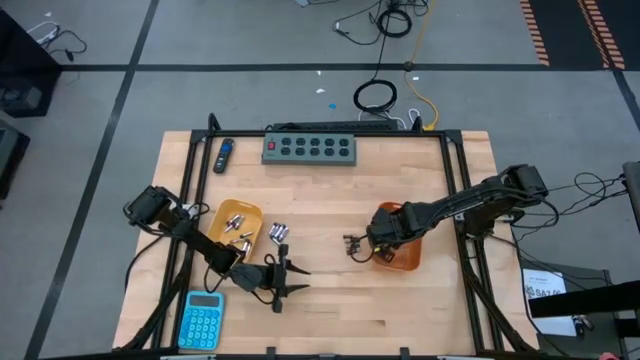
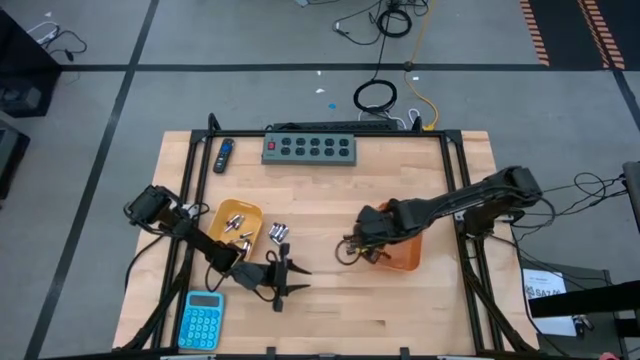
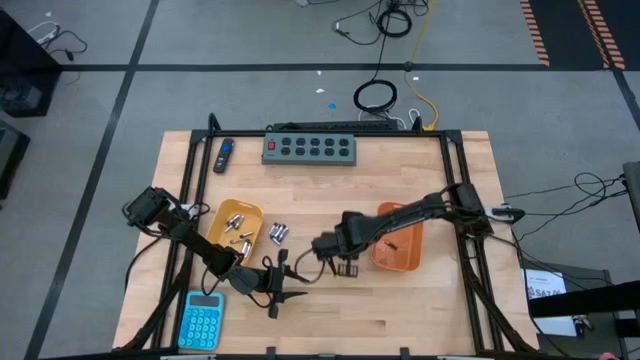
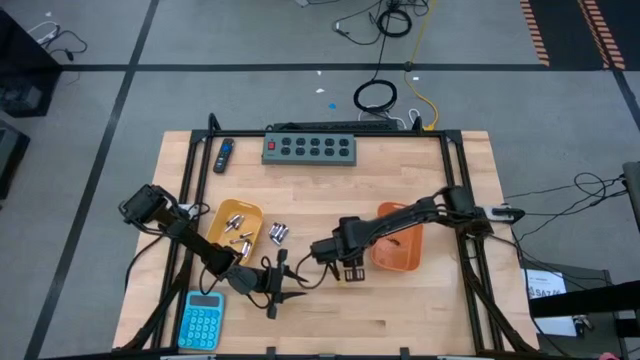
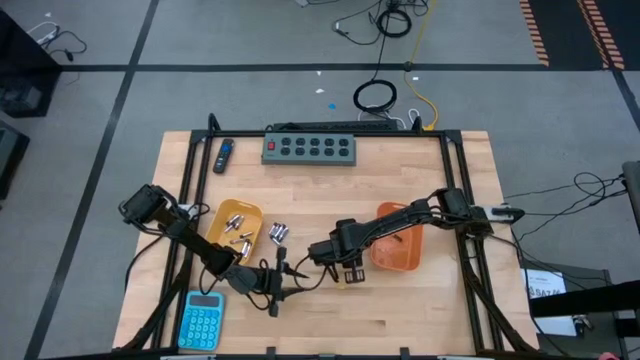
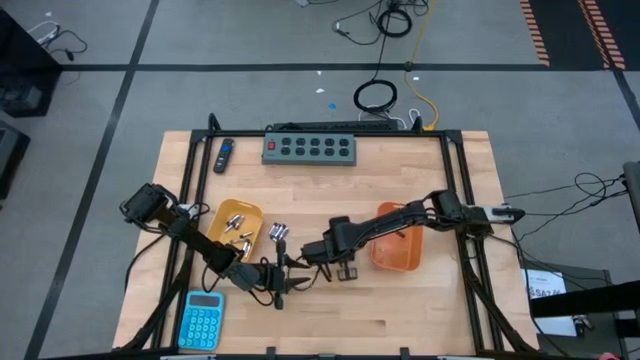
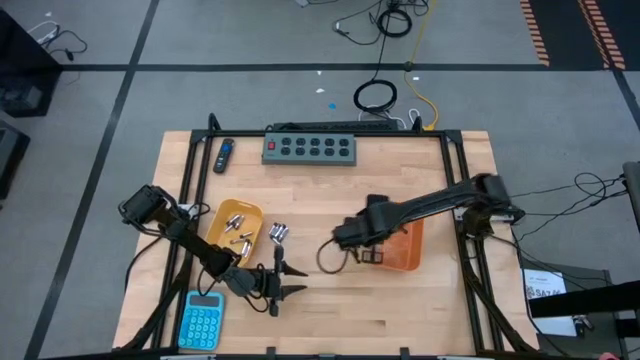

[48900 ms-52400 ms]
Task: Sort batteries
Put the black battery into the orange bin

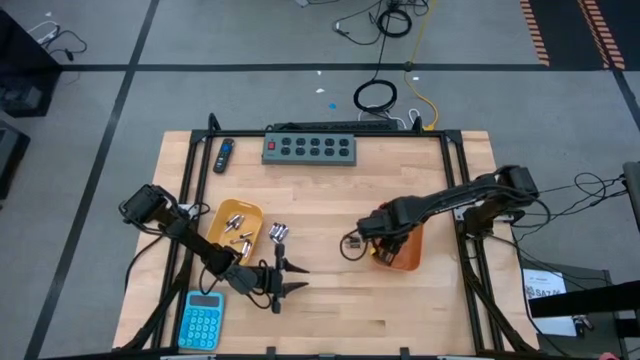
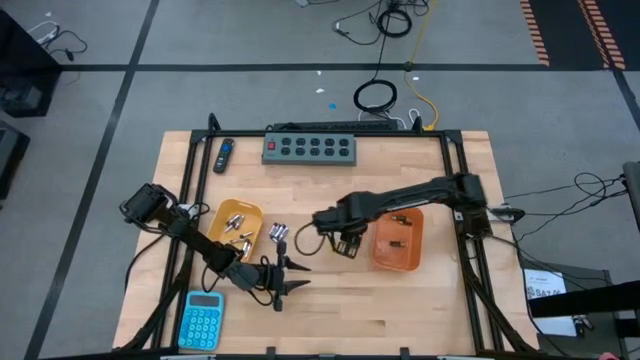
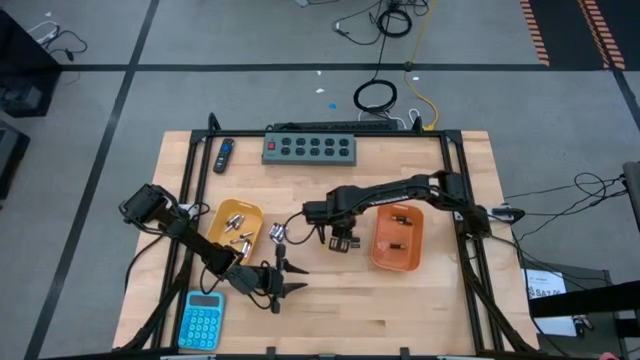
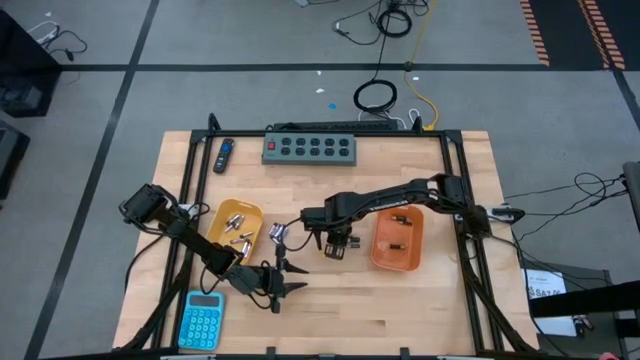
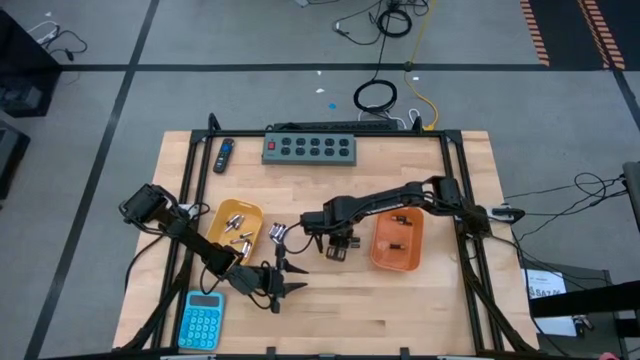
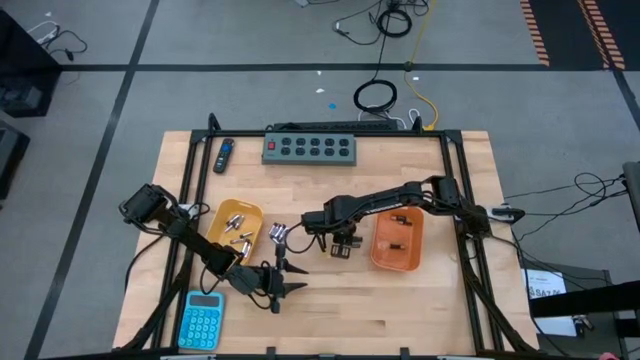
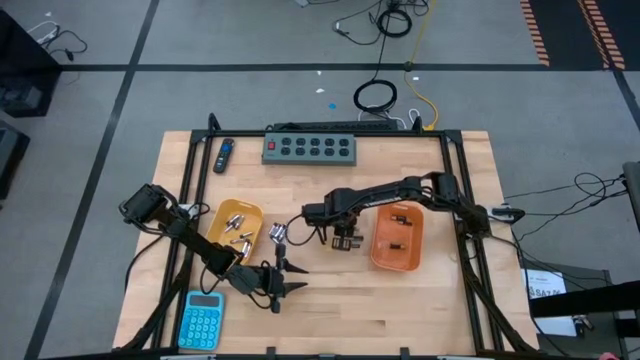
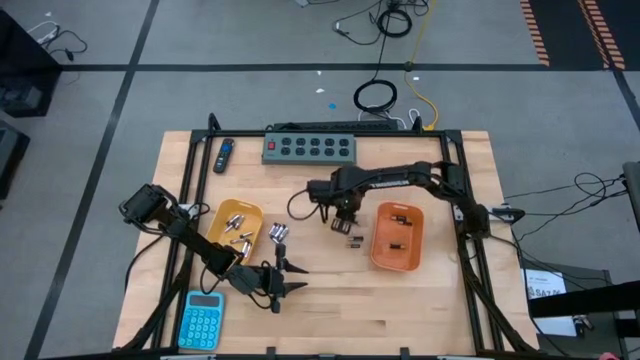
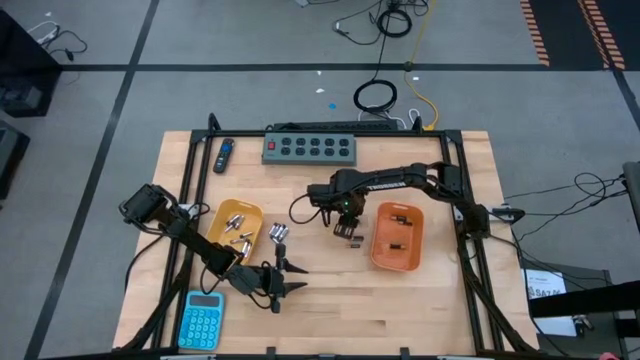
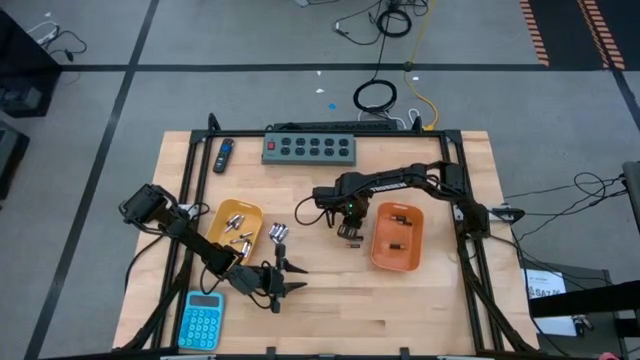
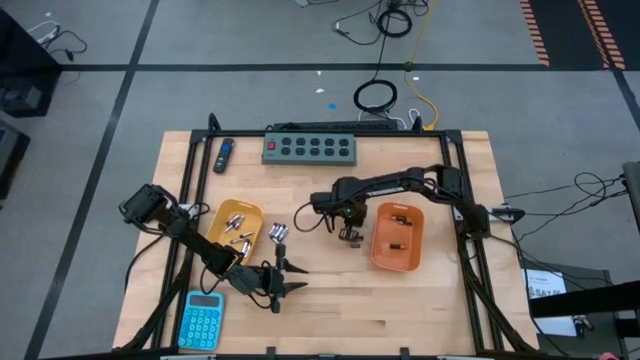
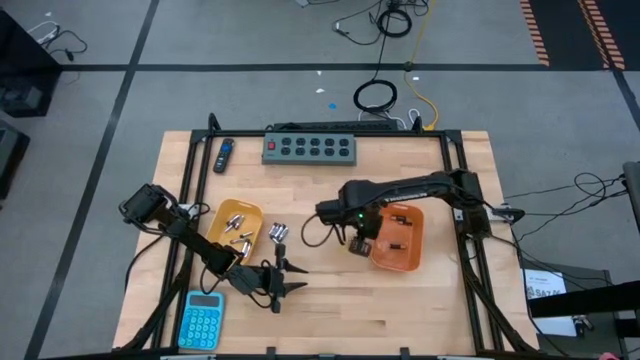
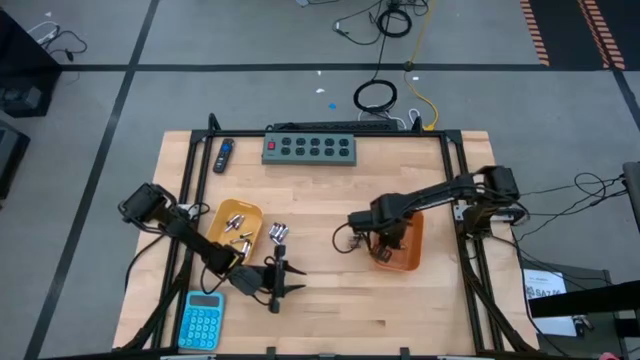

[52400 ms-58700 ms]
Put the black battery into the orange bin

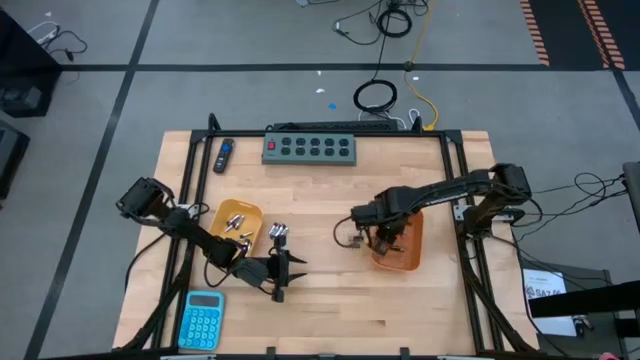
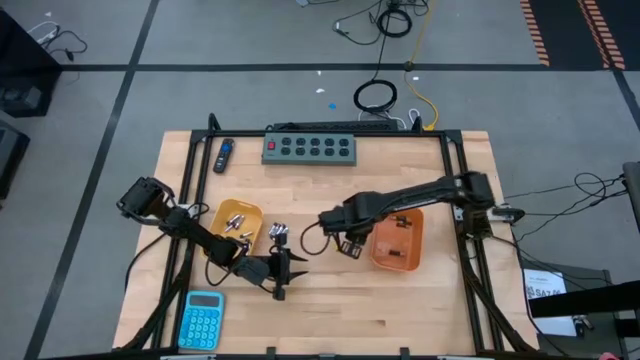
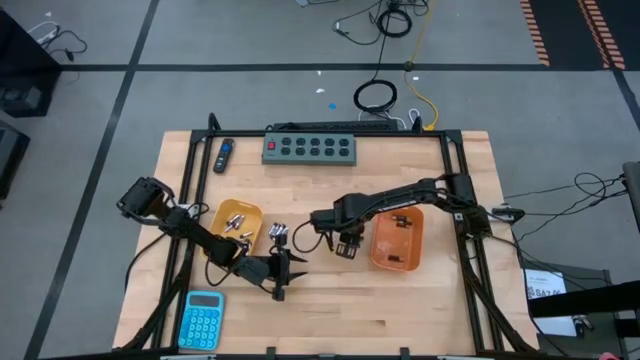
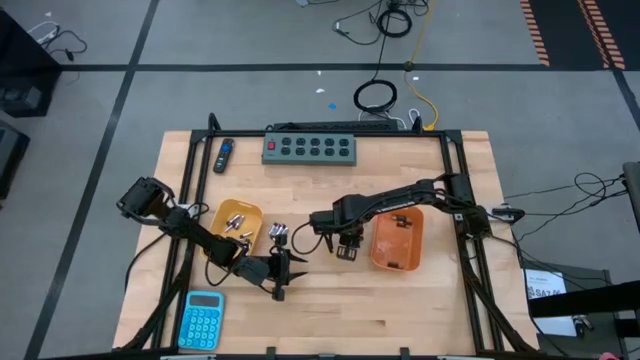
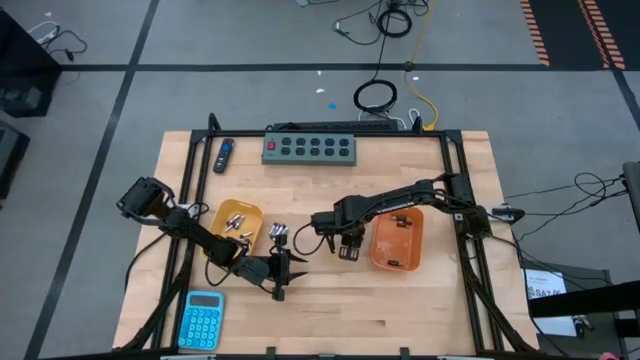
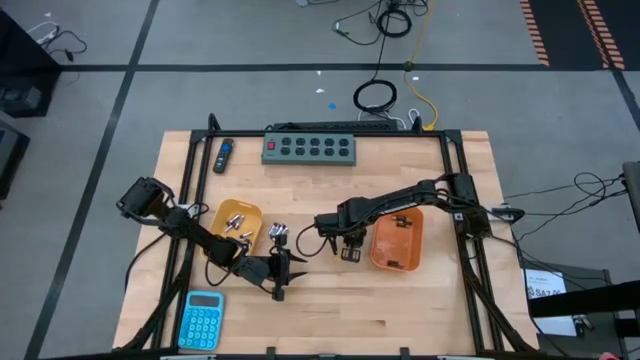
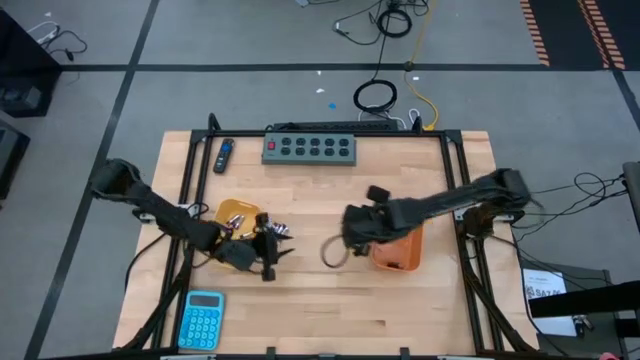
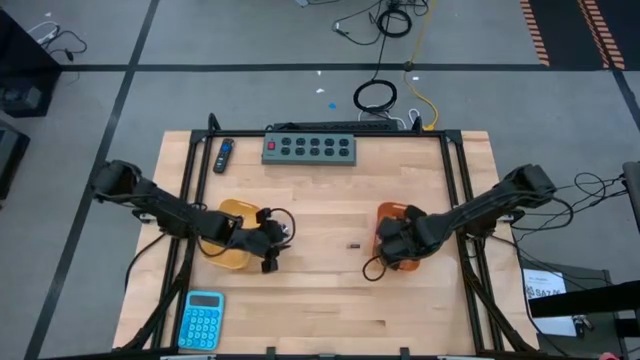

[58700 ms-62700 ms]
Put the black battery into the orange bin

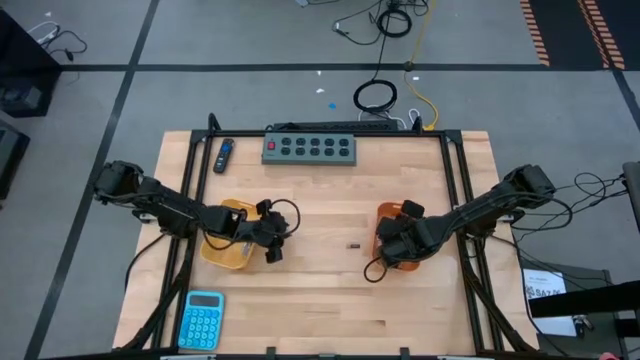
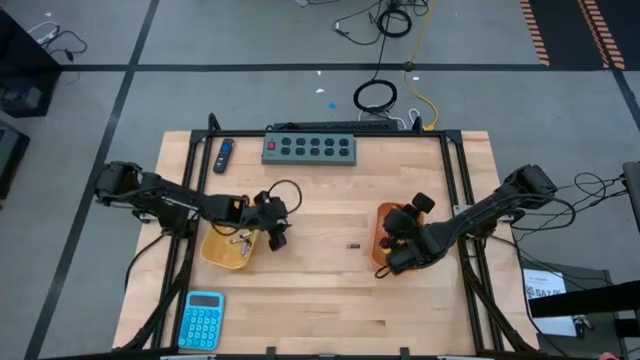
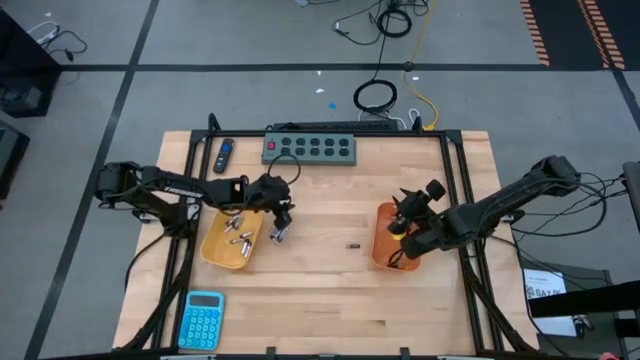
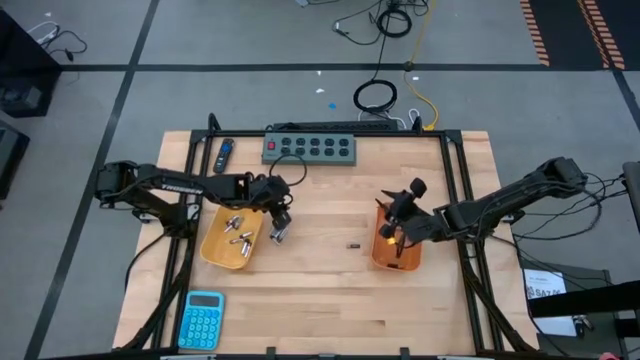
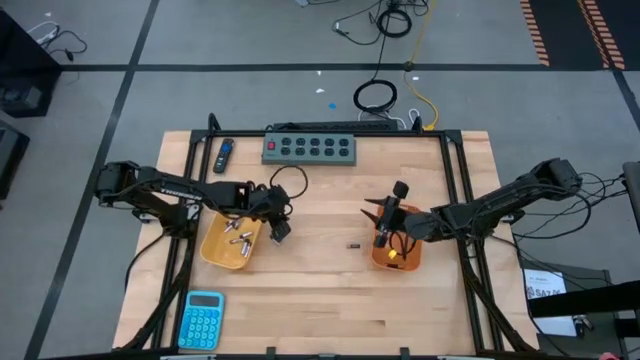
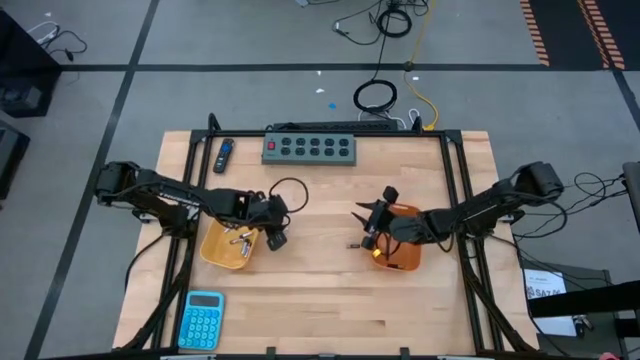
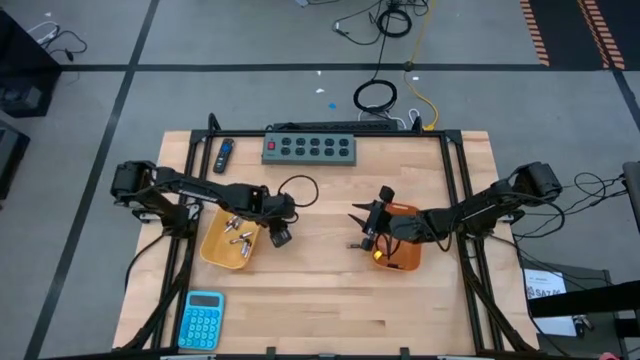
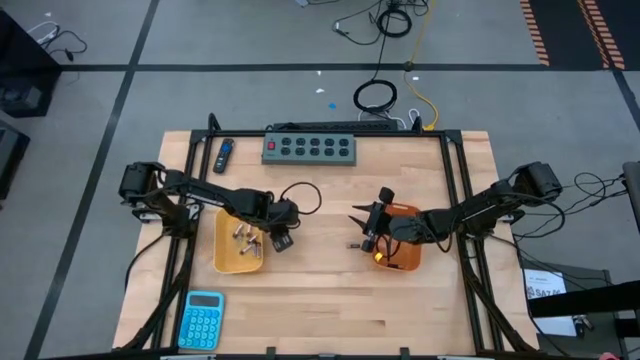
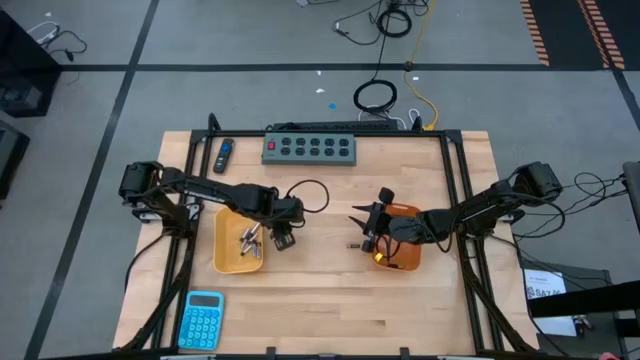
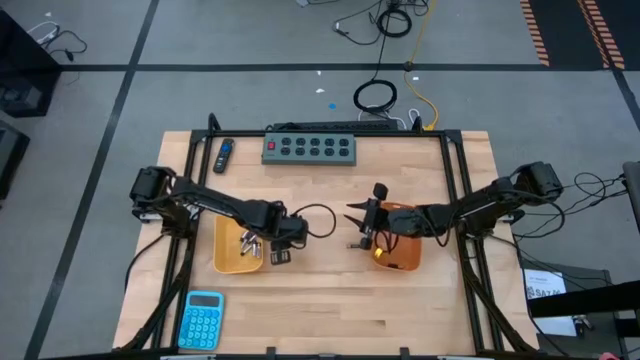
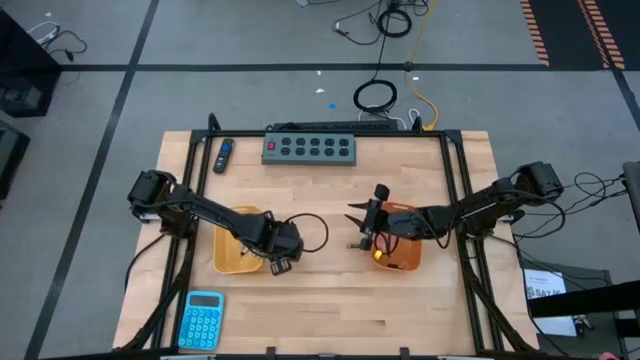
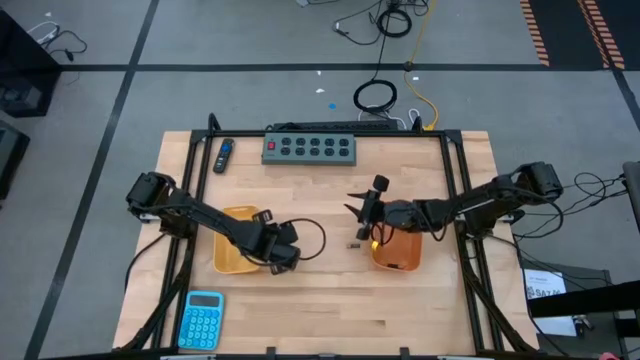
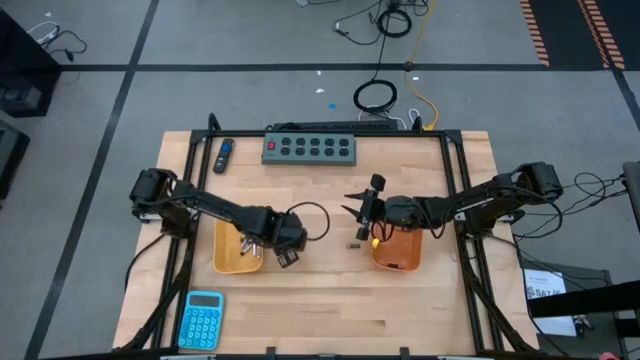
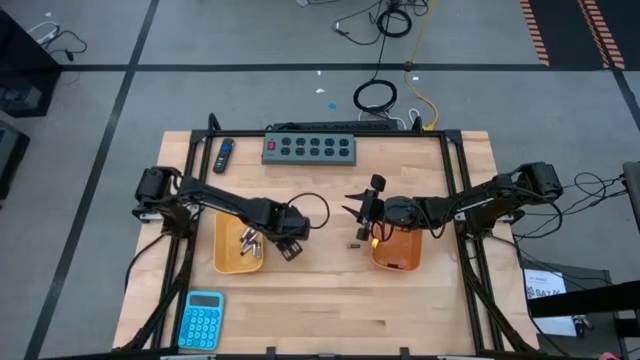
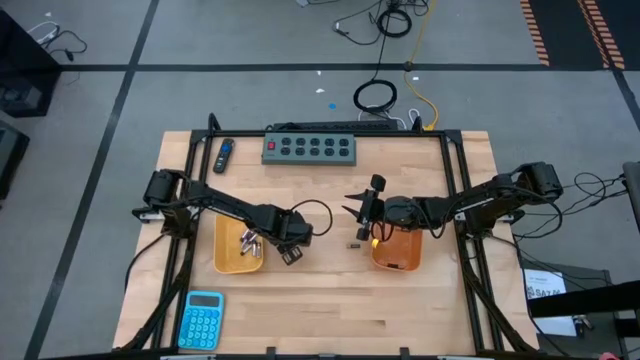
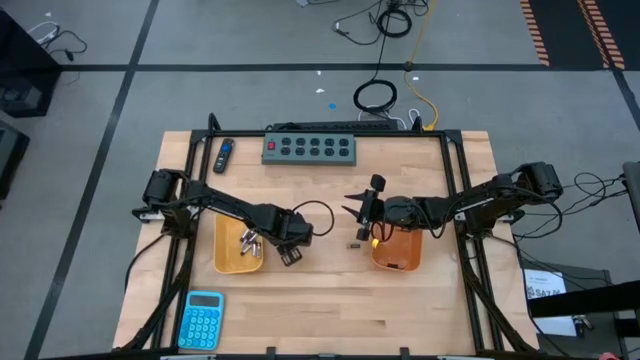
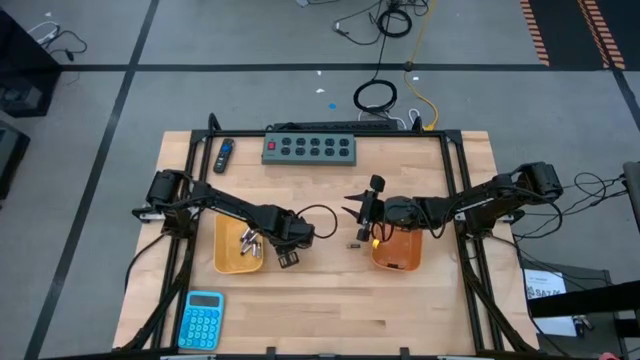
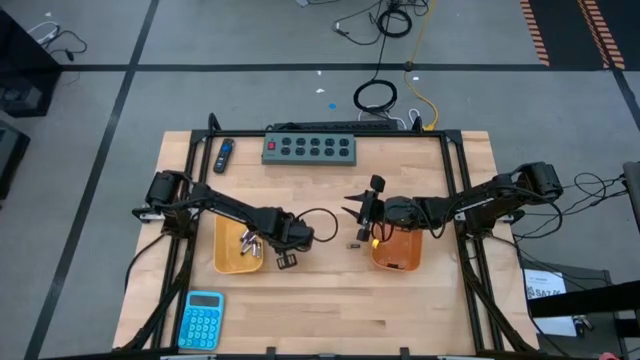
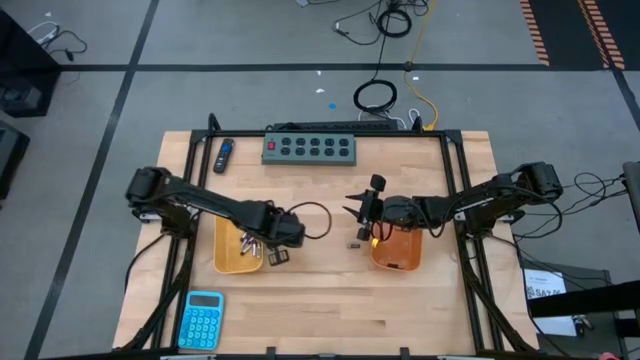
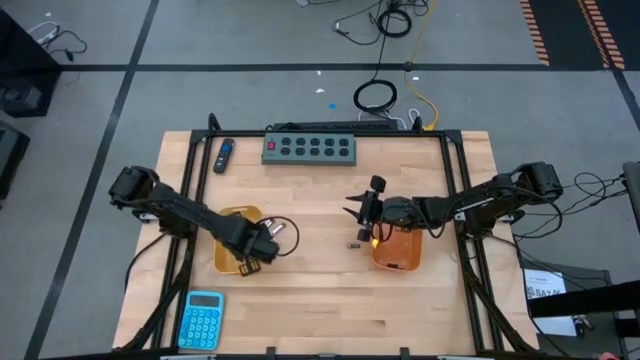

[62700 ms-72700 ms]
Put the silver battery into the yellow bin
